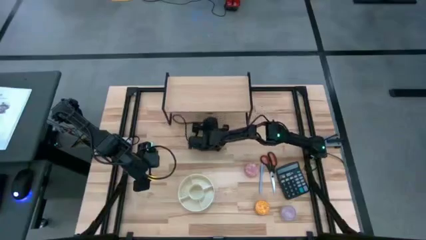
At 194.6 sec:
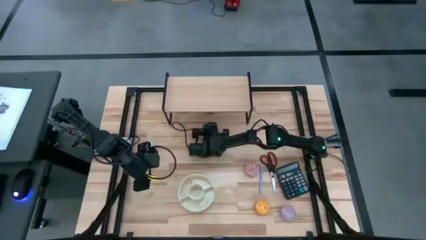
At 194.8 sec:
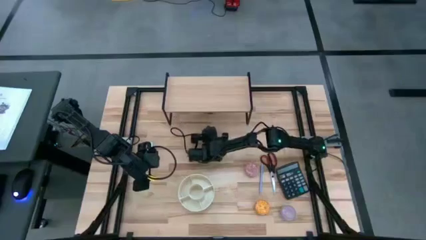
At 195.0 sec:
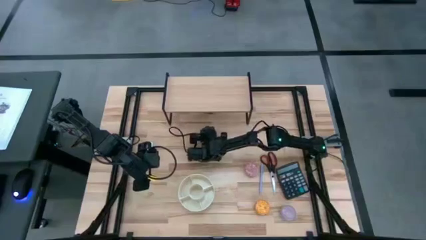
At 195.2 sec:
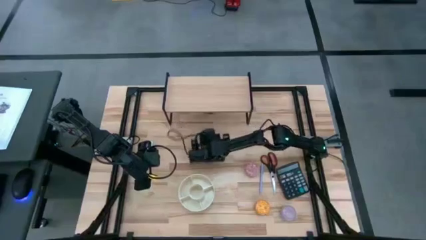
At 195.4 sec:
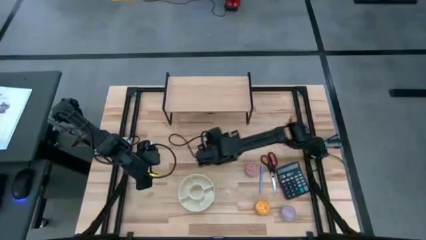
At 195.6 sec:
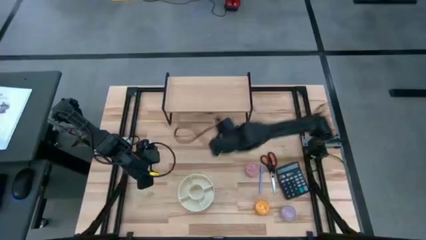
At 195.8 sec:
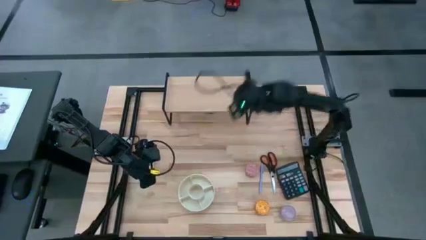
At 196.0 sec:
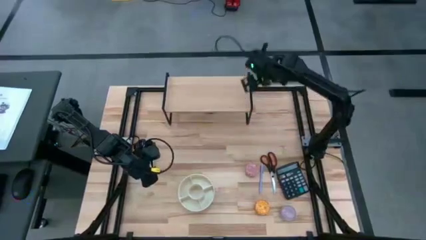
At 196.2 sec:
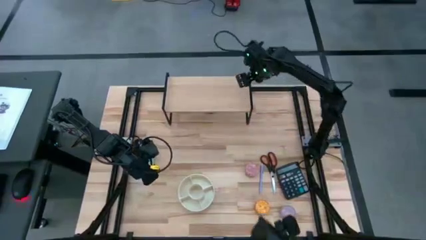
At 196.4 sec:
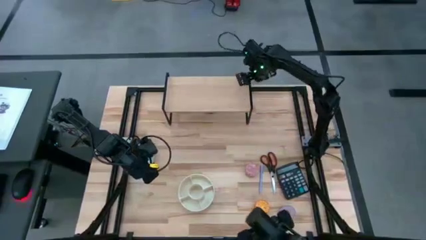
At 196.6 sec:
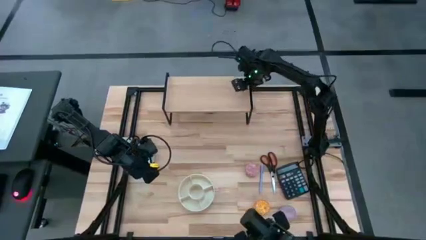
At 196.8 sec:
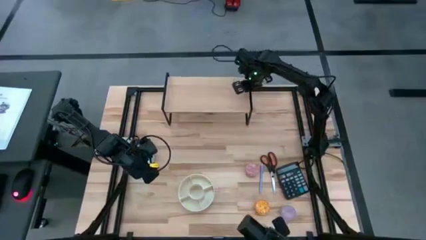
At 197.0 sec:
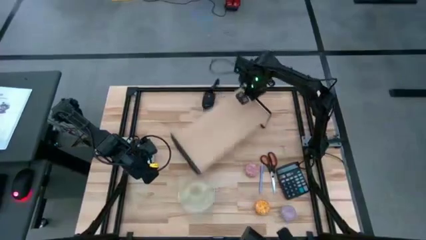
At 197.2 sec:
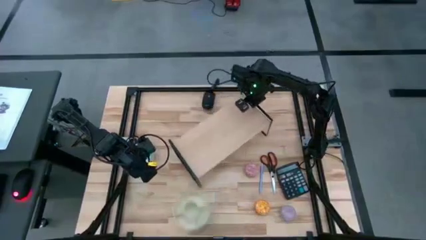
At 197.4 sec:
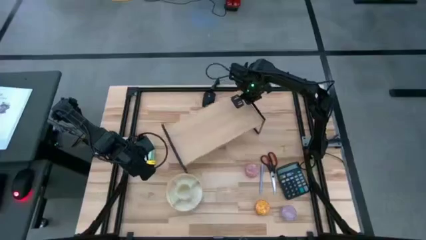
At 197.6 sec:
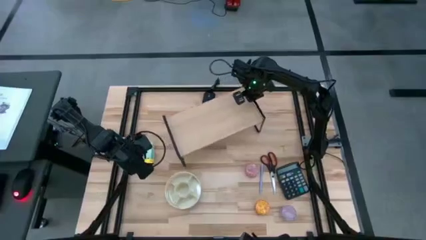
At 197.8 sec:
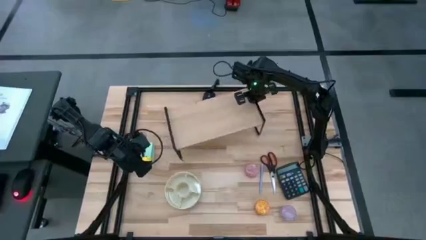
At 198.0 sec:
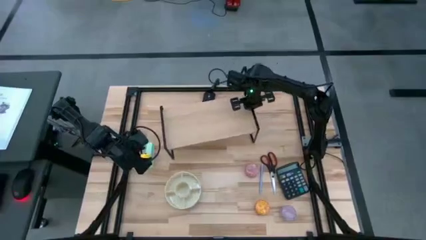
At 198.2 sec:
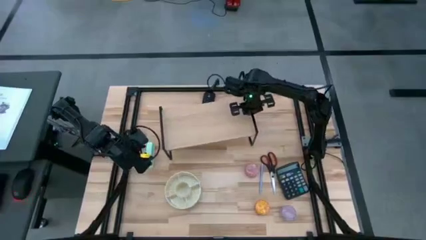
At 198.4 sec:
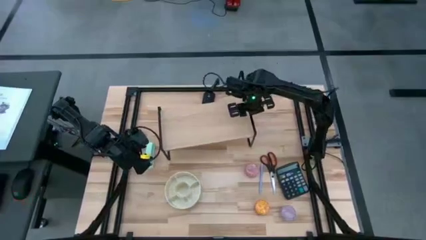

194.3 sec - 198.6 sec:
Task: Stock shelves
Move the shelf to the center of the table

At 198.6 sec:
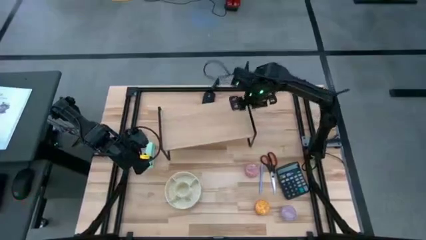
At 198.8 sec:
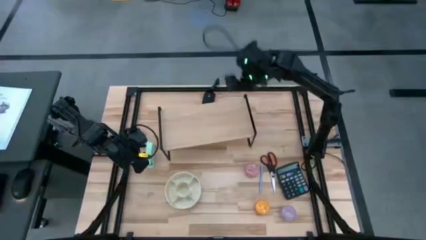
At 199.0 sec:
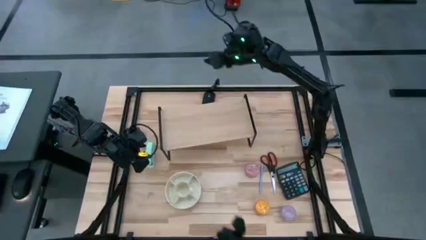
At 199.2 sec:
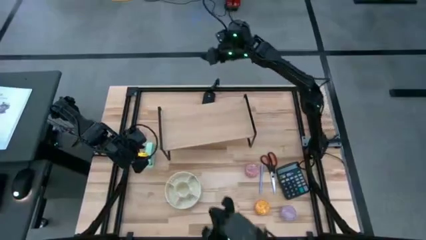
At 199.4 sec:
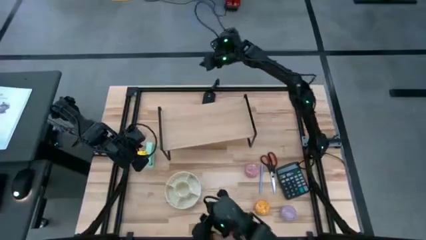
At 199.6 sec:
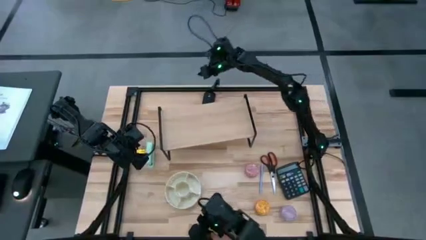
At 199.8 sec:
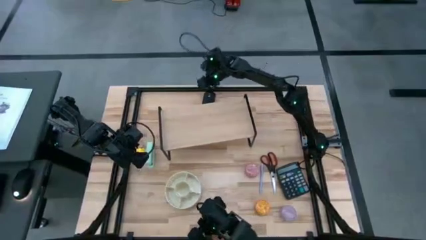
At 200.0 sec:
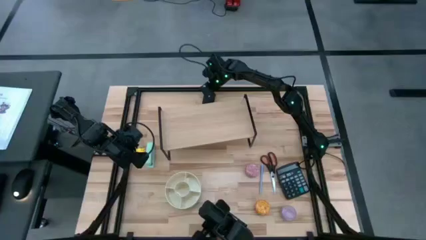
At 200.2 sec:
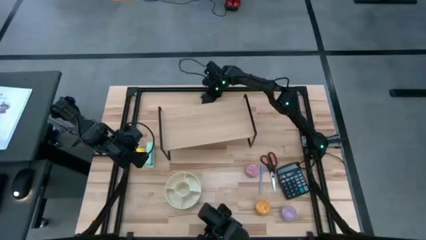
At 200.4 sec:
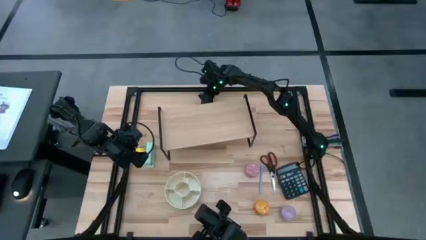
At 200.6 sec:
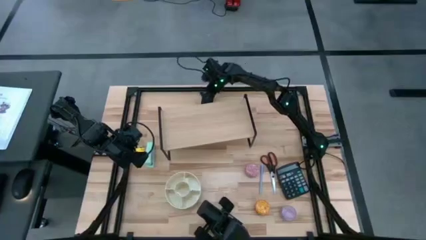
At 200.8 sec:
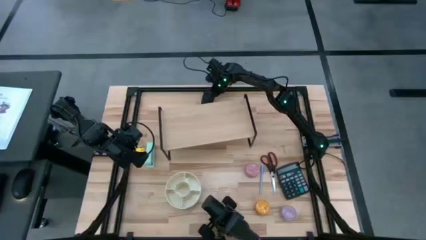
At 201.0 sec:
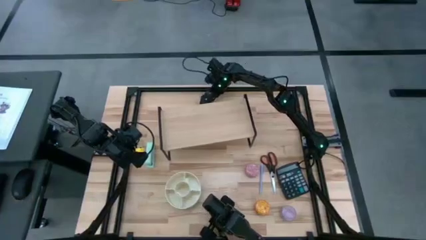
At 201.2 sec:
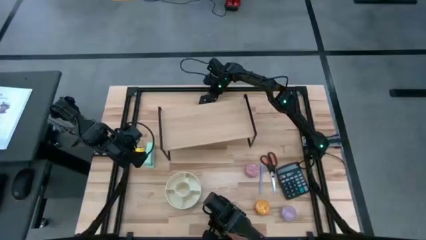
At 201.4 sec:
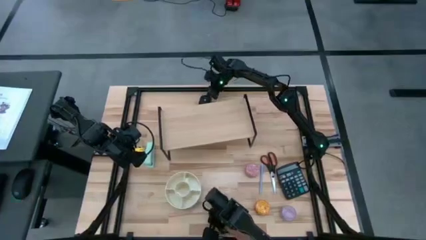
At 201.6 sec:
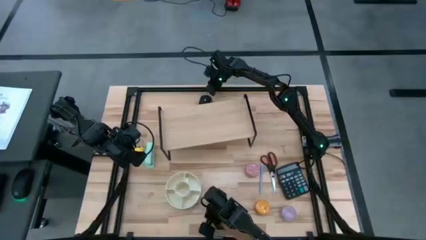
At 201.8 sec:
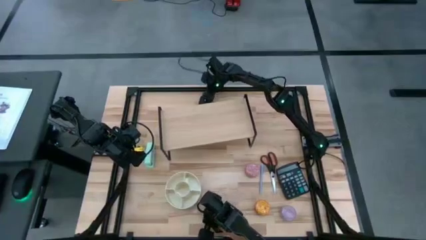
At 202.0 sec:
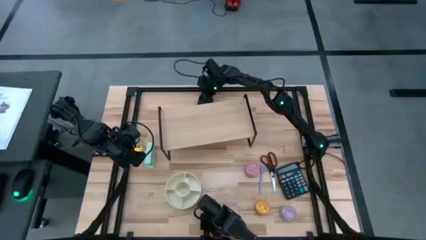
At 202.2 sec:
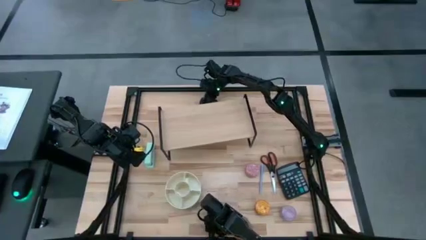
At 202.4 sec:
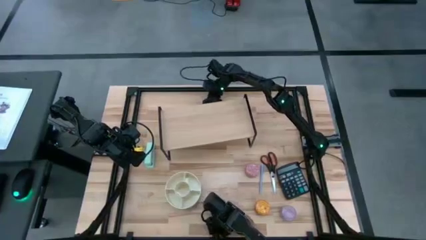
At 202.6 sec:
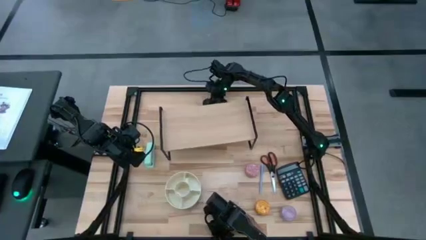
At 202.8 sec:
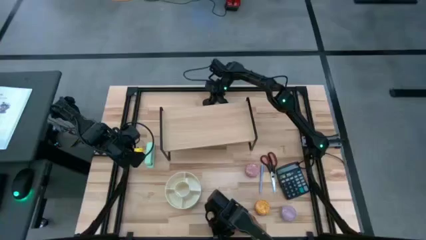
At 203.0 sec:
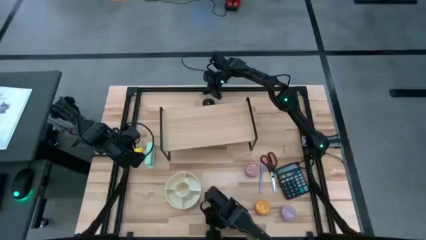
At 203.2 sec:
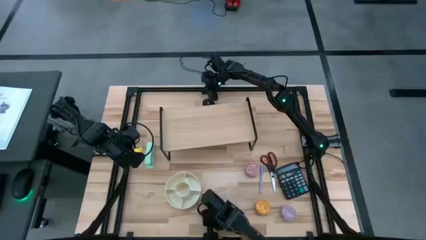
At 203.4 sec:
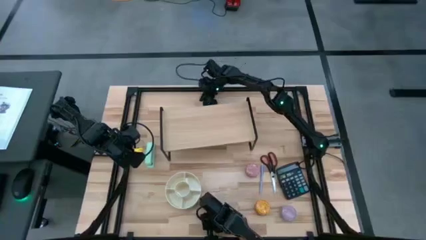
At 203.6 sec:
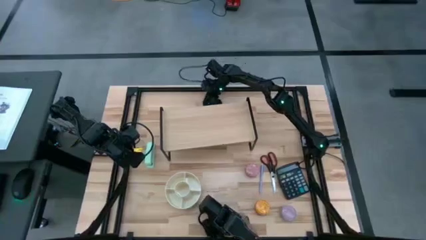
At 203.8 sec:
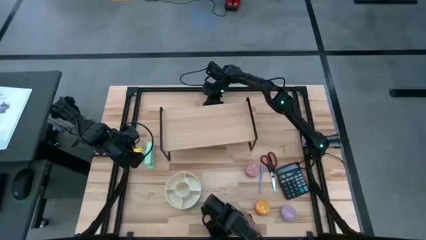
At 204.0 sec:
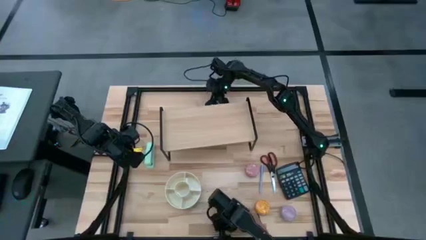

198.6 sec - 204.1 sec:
Remove the black mouse from under the shelf

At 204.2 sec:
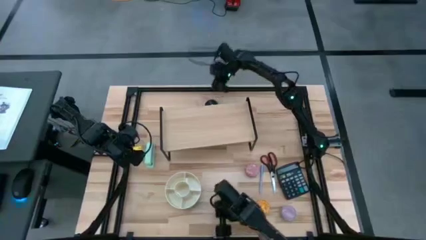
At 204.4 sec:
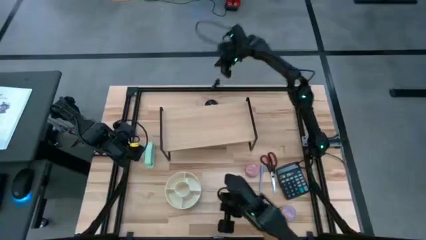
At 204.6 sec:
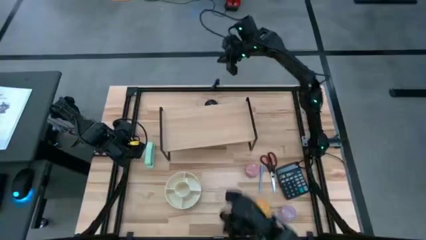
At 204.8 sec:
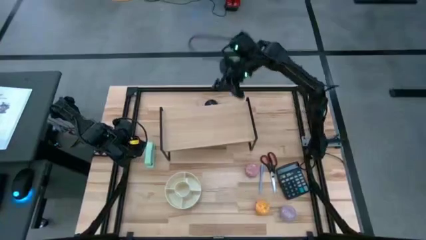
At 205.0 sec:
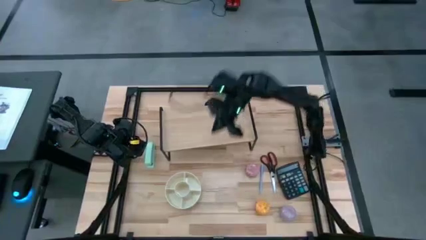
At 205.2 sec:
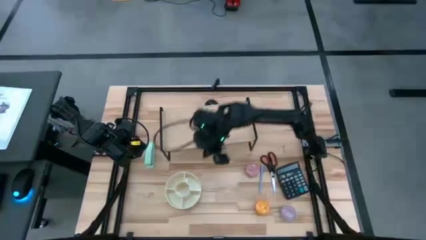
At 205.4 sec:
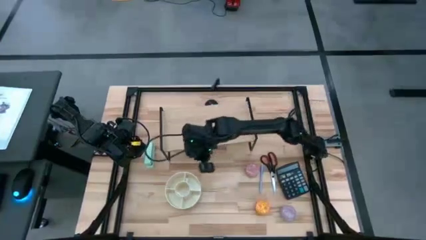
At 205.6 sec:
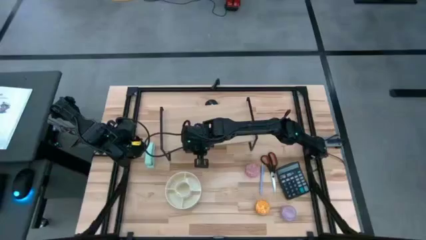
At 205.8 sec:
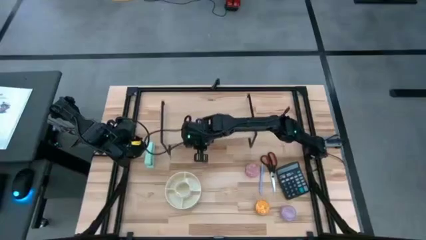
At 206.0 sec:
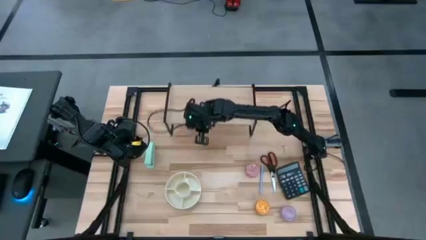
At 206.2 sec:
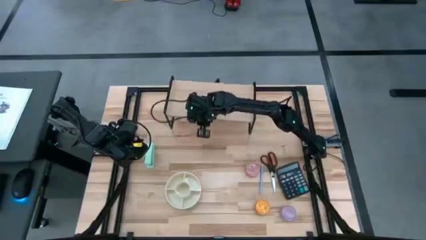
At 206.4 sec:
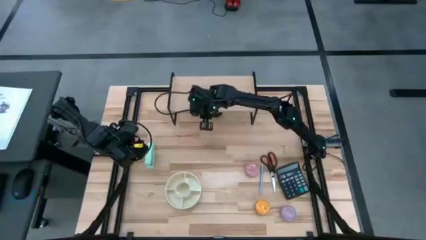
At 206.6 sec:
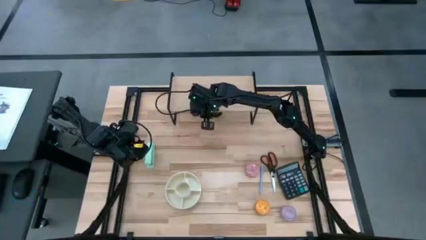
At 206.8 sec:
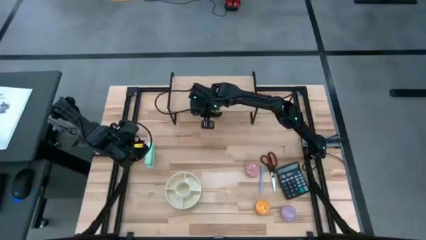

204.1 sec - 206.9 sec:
Move the shelf to the top center of the table
